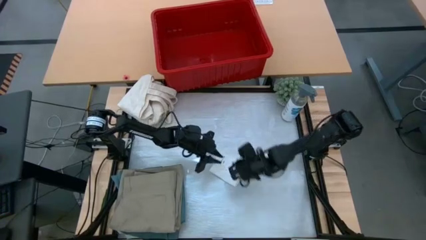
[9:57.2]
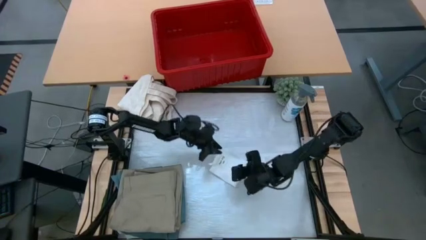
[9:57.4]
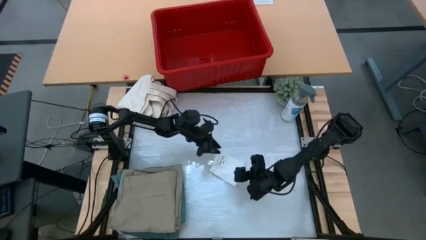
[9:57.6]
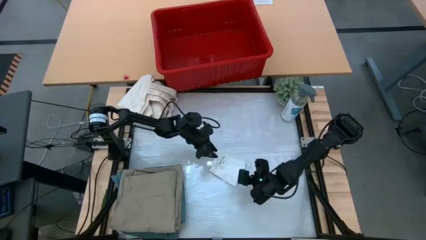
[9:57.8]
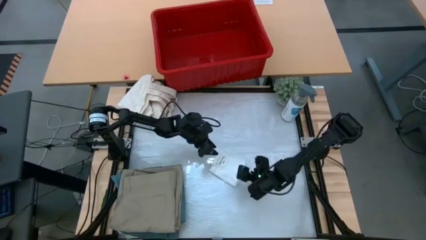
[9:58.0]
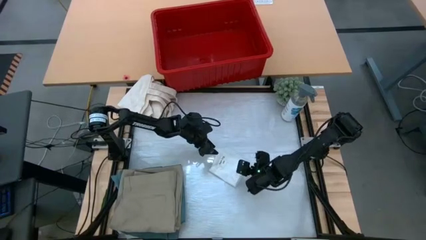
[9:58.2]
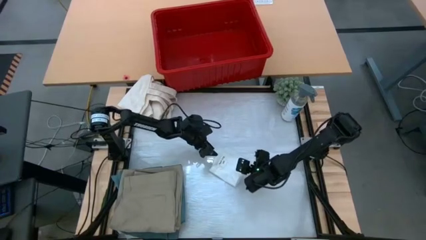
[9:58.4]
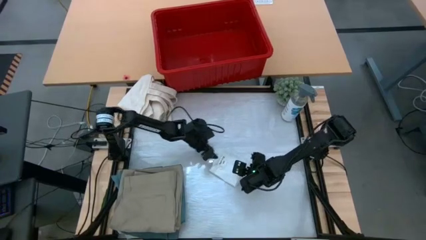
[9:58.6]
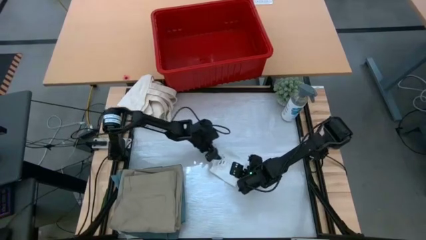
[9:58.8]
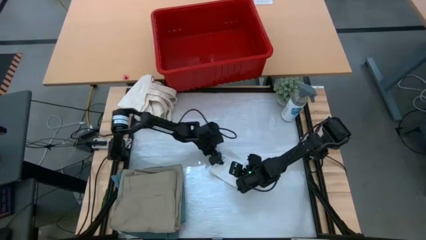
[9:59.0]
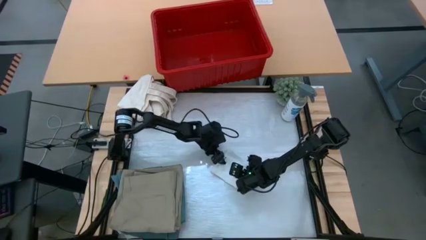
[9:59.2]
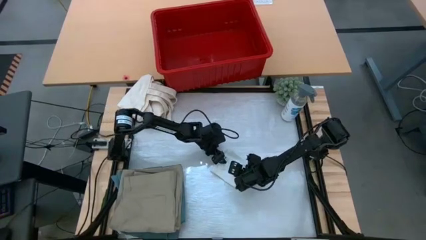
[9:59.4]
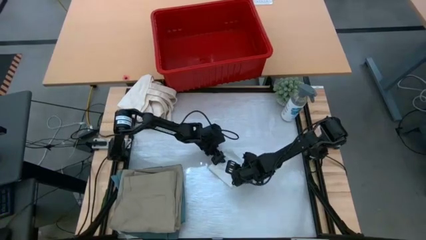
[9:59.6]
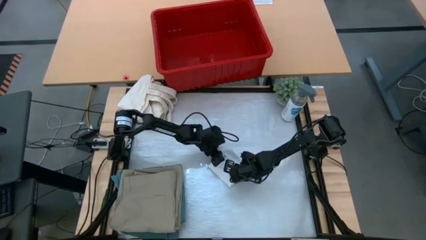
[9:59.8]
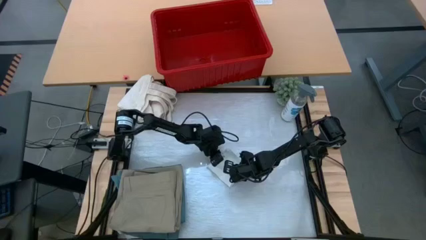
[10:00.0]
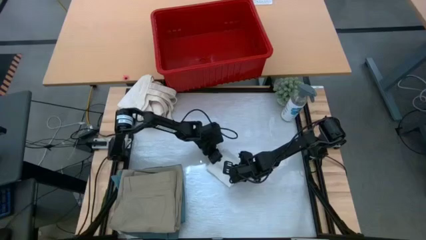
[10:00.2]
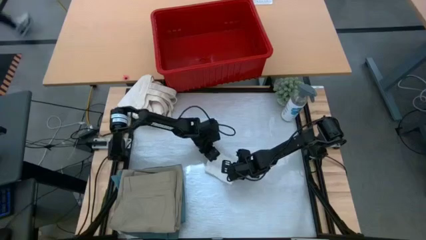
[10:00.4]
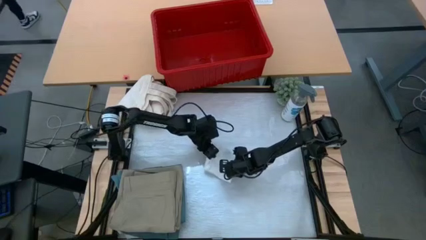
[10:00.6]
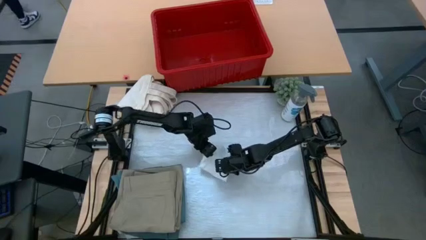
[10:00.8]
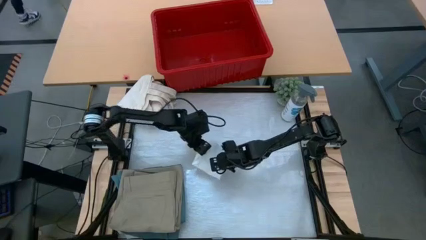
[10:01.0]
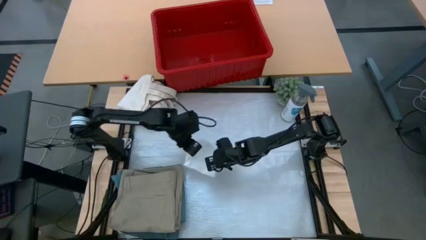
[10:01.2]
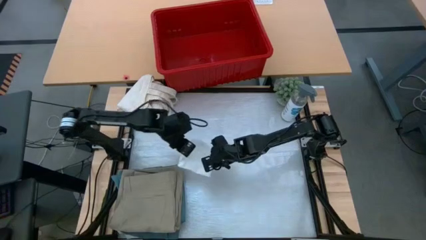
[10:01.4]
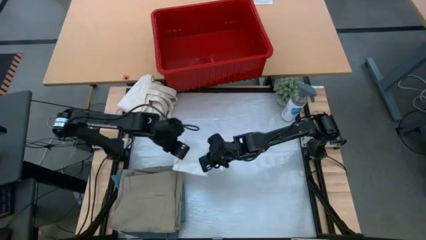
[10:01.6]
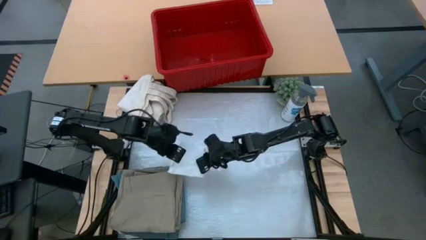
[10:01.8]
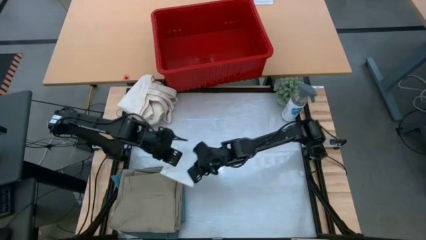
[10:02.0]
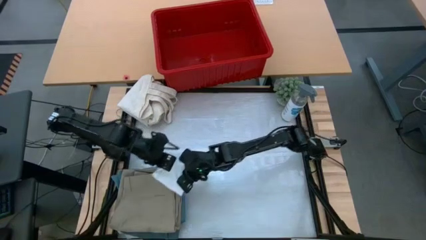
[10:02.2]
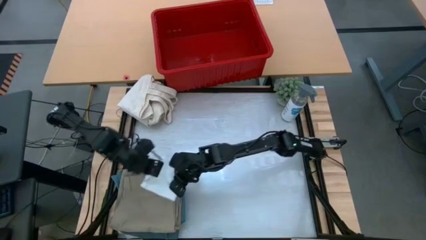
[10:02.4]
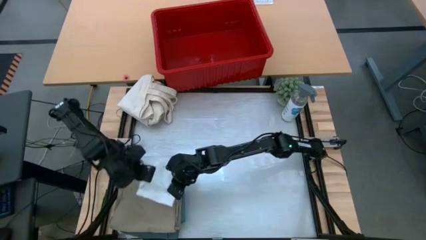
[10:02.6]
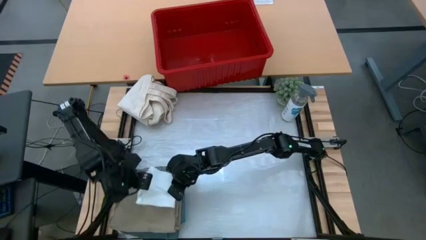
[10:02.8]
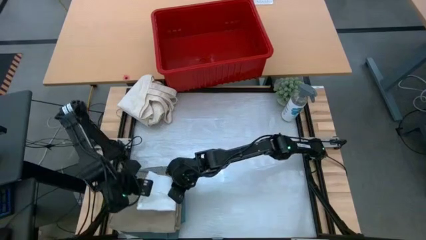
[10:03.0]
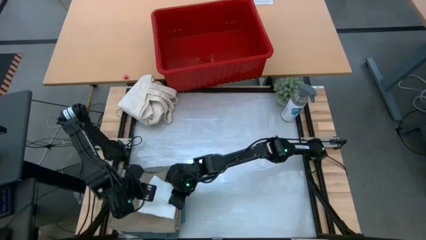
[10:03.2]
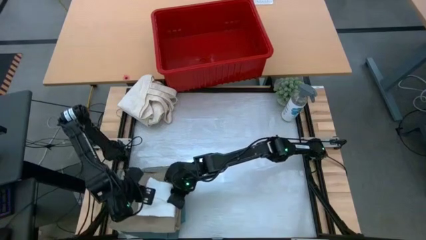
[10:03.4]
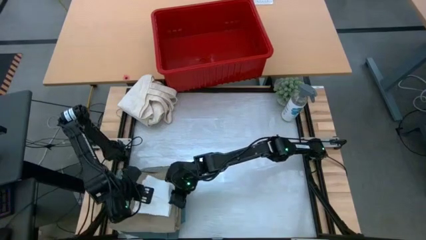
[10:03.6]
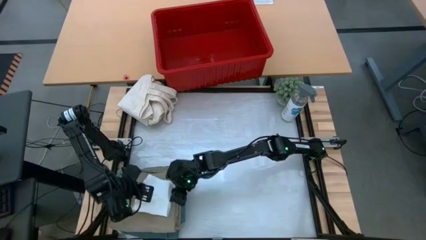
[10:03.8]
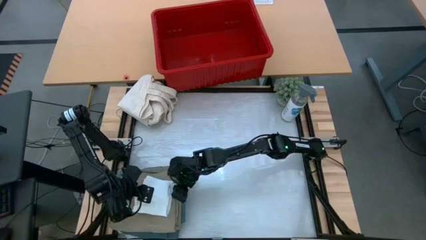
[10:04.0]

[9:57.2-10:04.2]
Task: Fold Laundry from Bin
Stack the white underwear on top of the brown shorts

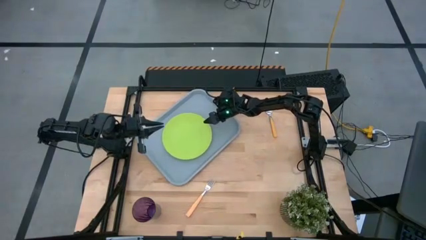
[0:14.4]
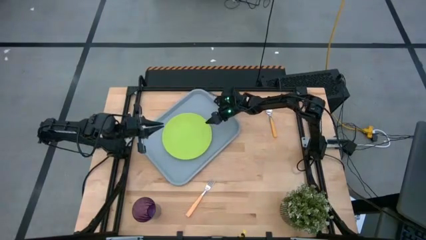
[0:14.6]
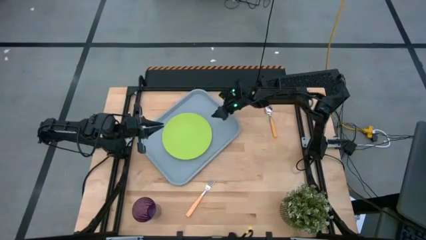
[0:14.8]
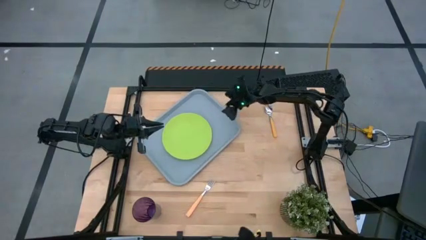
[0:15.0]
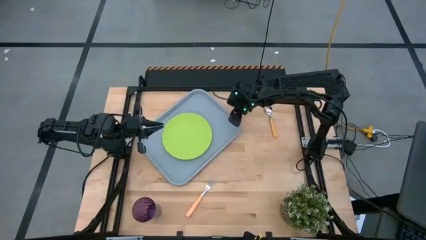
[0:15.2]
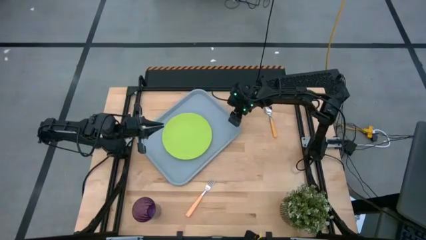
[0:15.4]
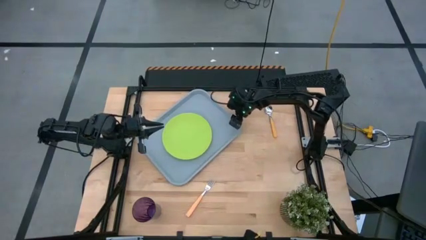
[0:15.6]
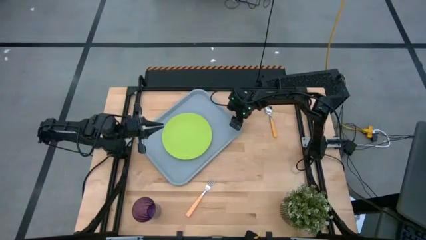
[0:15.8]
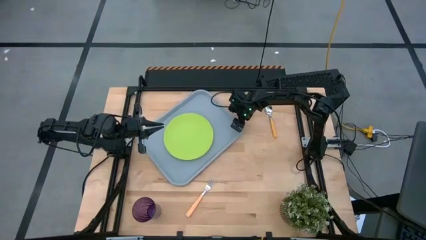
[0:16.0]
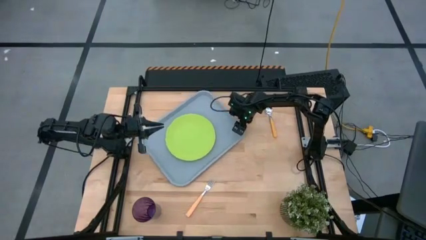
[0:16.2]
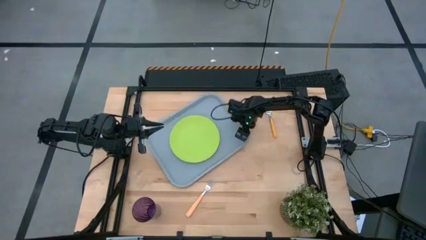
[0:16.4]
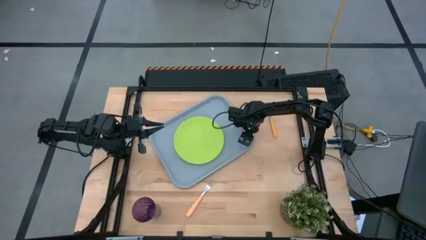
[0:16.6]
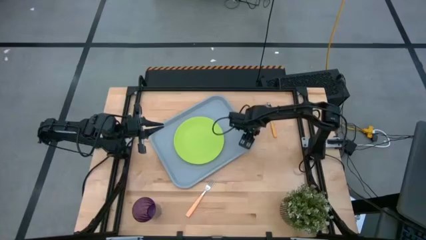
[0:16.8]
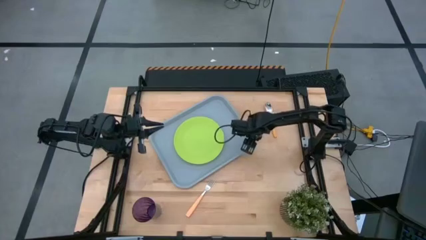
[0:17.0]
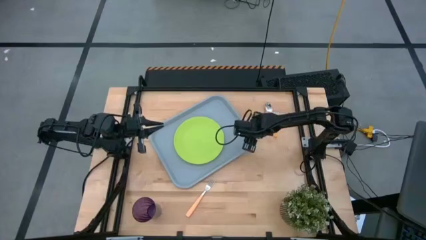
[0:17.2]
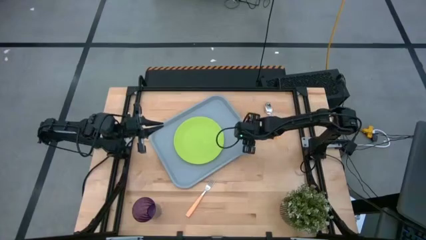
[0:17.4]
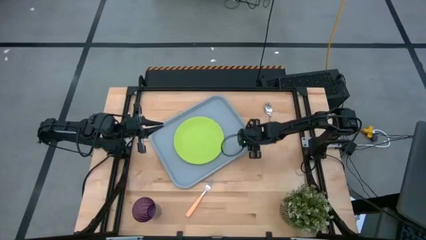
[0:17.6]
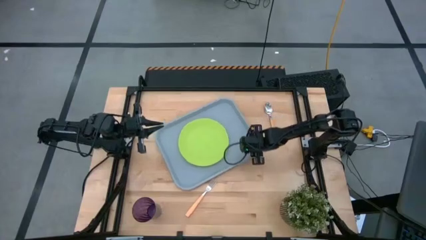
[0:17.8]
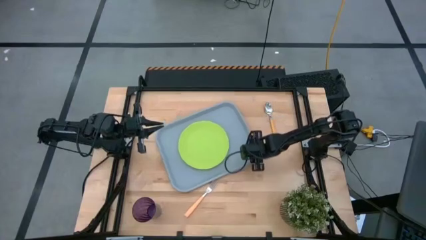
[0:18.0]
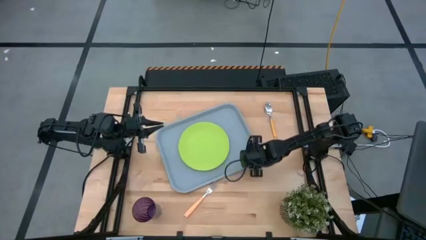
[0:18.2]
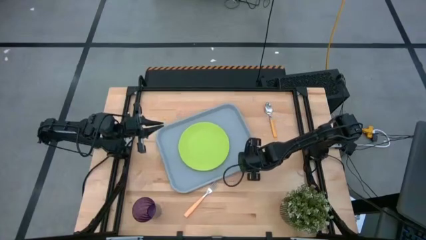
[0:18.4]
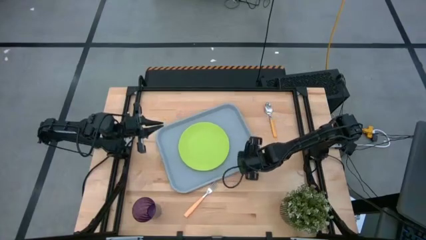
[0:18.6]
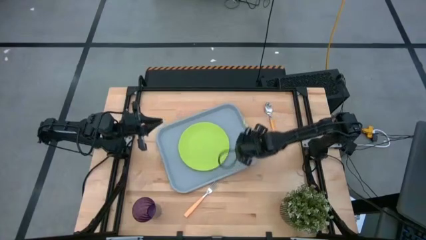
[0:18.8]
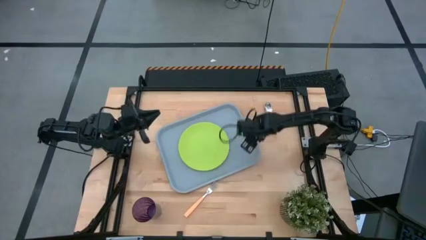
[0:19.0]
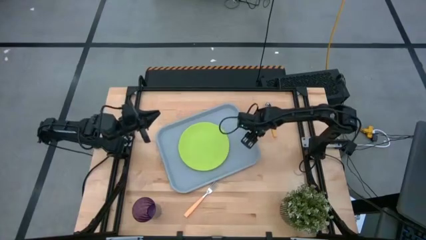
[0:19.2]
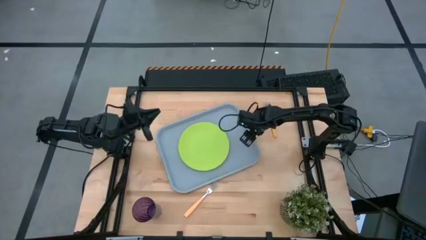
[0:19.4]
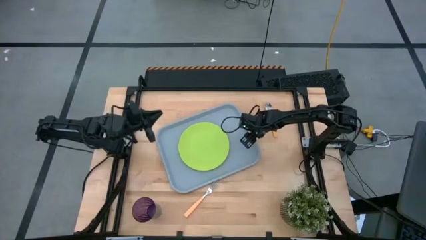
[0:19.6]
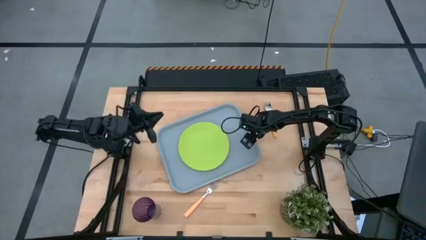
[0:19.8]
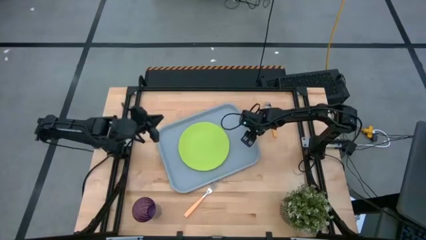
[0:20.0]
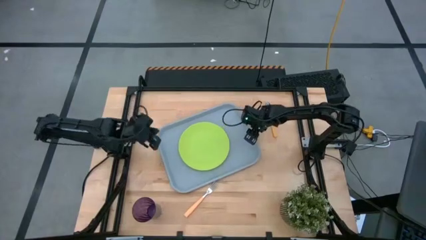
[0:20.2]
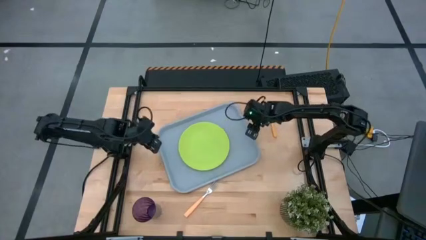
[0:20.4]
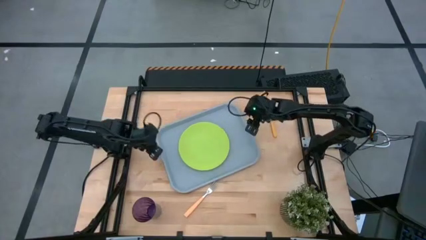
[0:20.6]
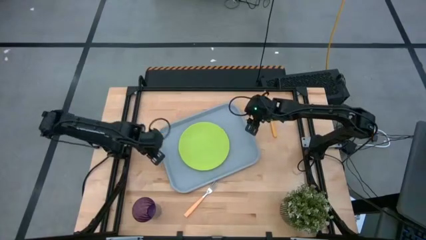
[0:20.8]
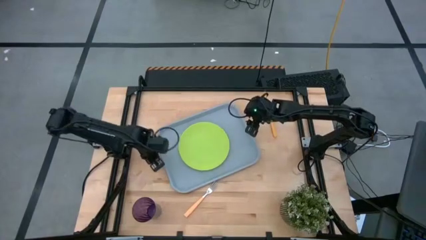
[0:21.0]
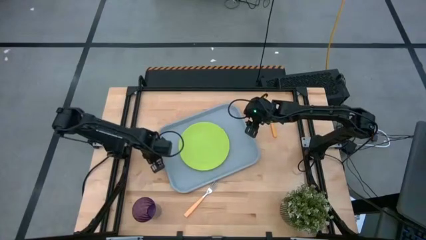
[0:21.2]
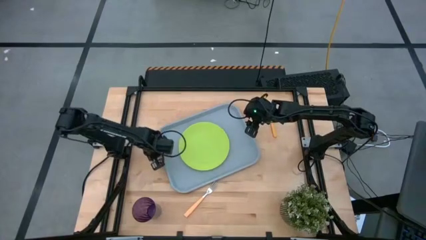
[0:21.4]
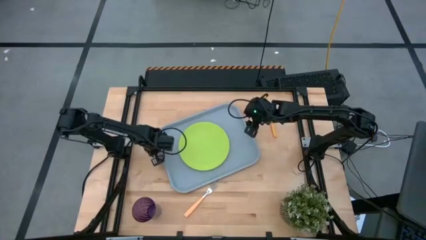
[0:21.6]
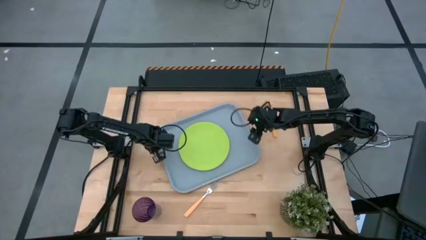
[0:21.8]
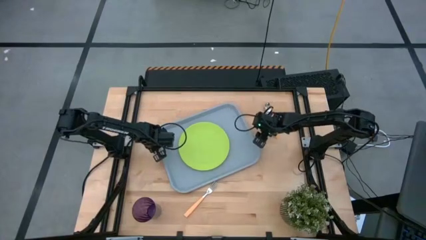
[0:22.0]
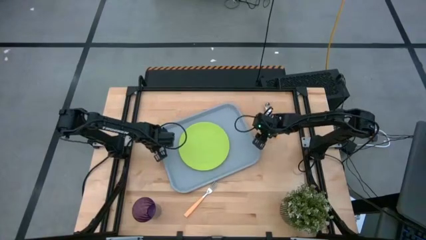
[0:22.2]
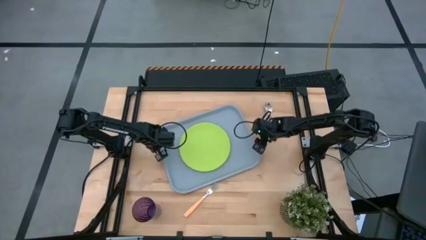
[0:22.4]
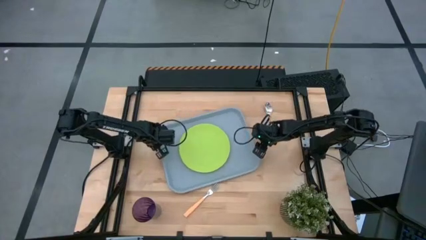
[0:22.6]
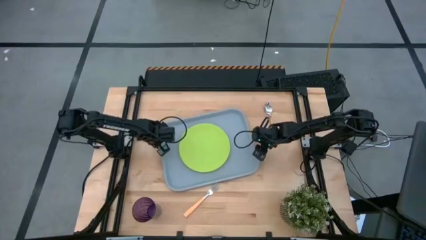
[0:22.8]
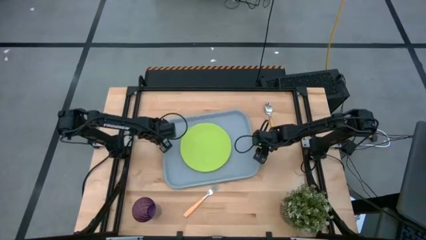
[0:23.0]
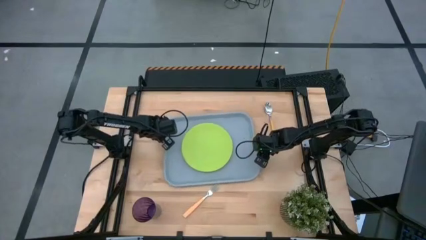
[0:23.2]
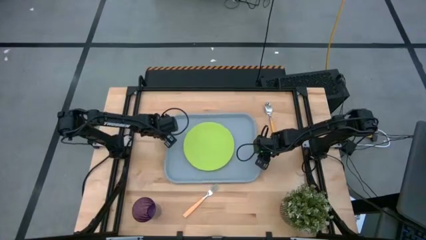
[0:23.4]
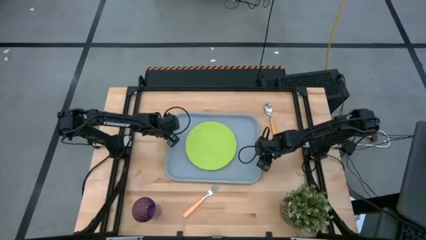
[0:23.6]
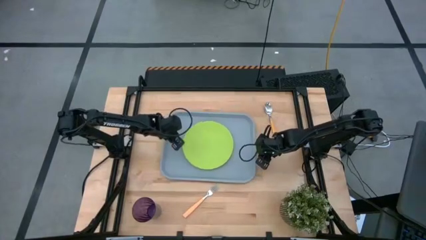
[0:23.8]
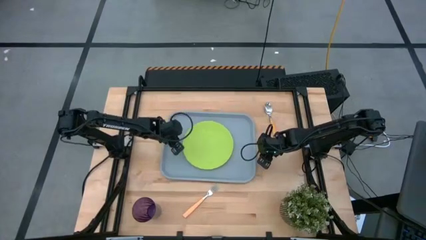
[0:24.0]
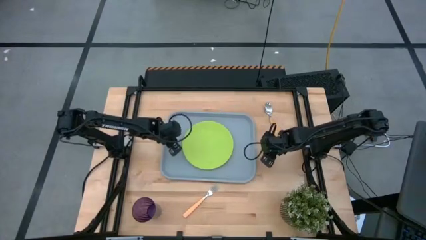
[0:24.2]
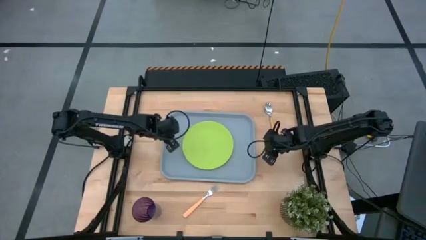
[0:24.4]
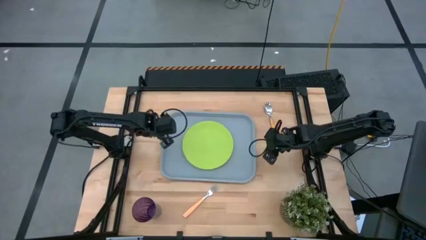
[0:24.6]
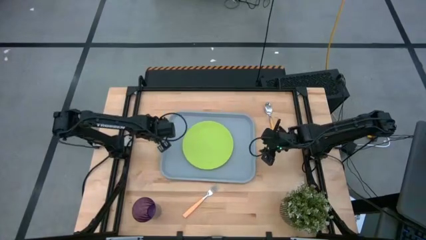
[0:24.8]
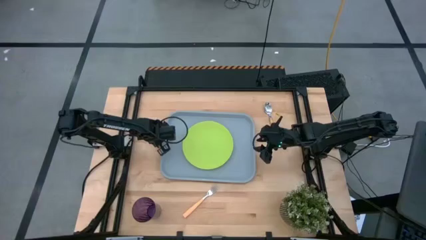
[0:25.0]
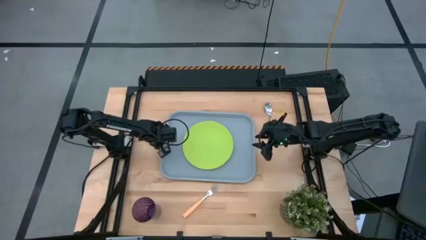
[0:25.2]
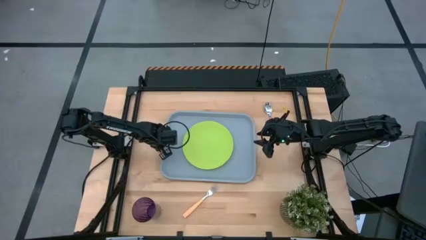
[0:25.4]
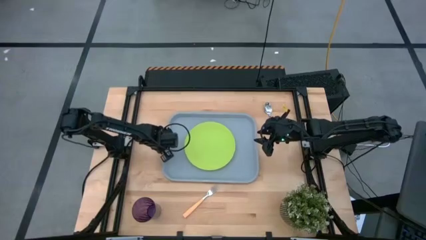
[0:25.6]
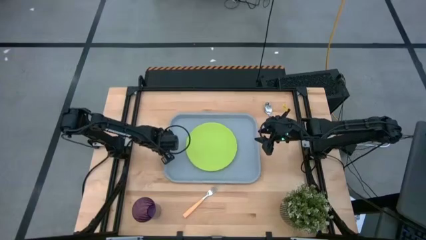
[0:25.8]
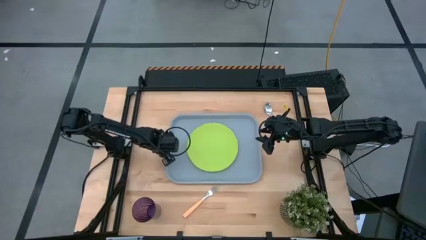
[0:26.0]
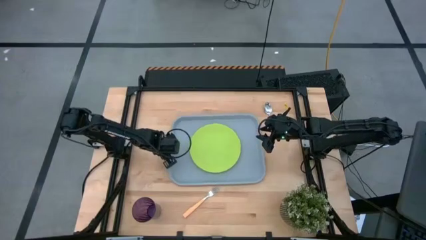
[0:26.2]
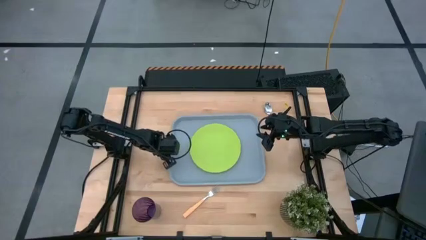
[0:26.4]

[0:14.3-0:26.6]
Task: Pick and place plate/cup/fork/spoon on tray
Adjust the gray serving tray to the center of the table
